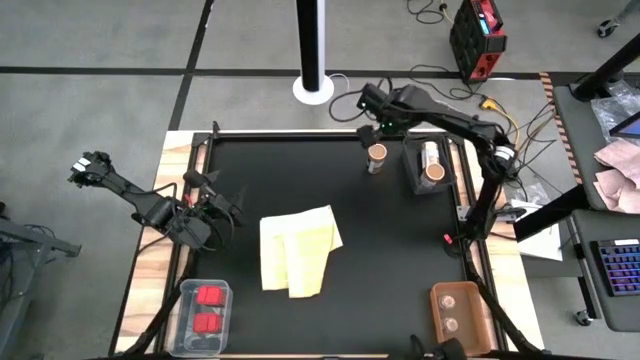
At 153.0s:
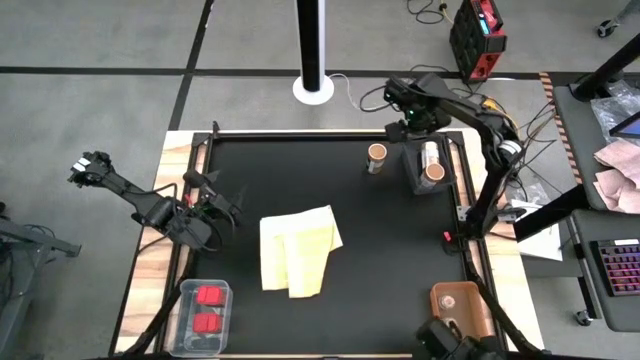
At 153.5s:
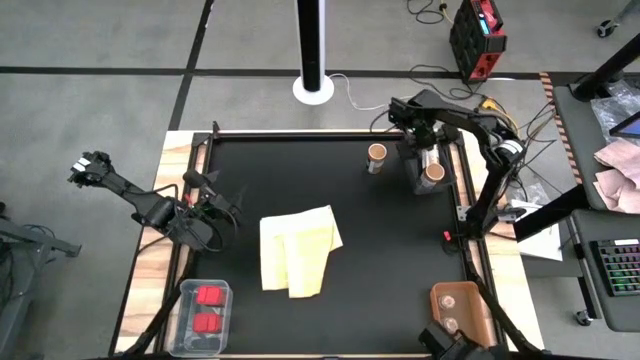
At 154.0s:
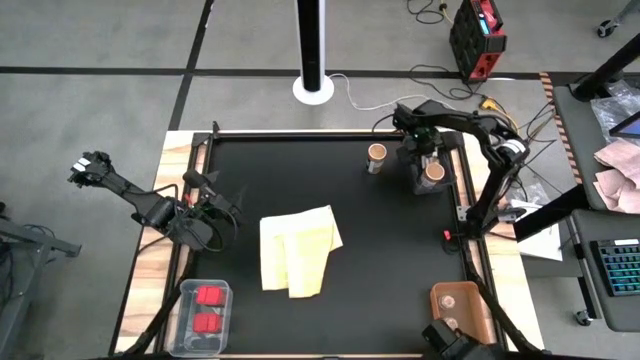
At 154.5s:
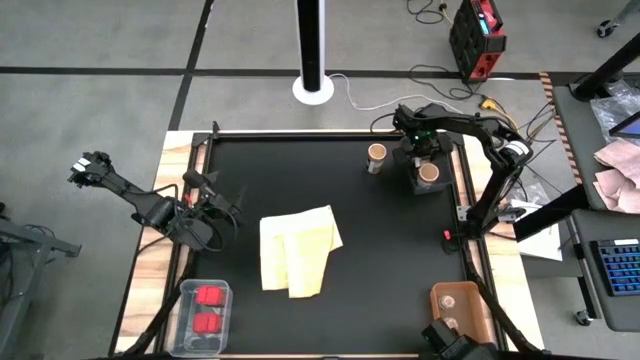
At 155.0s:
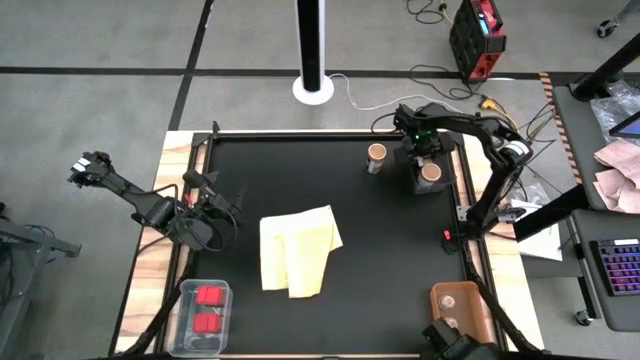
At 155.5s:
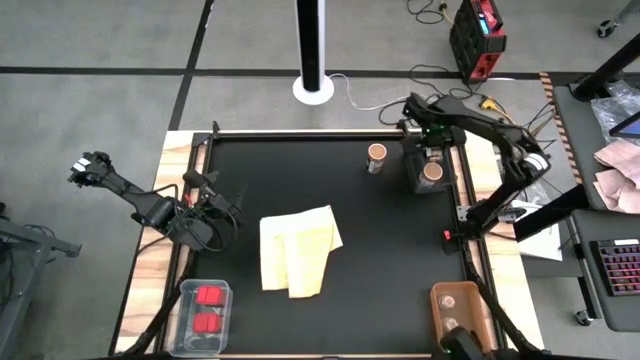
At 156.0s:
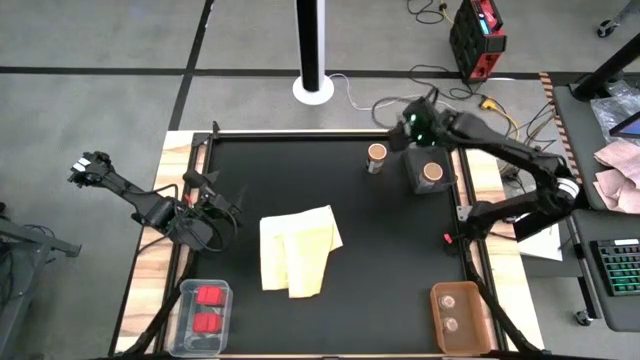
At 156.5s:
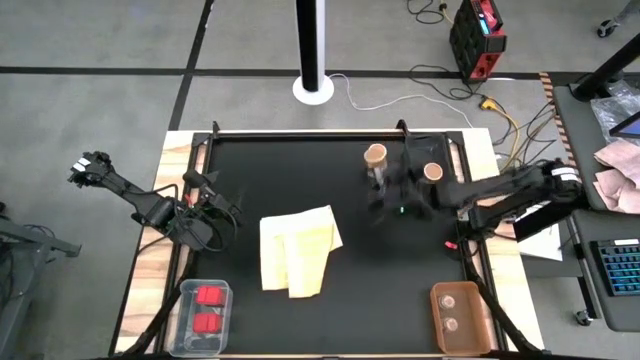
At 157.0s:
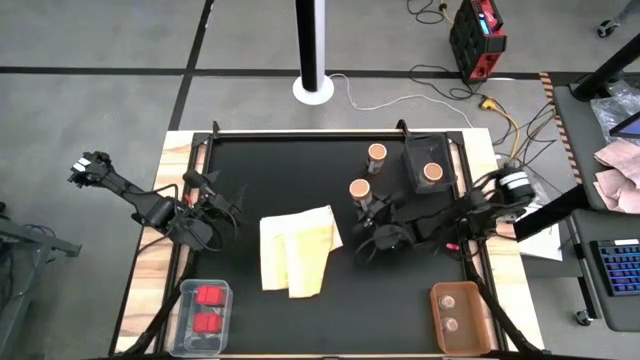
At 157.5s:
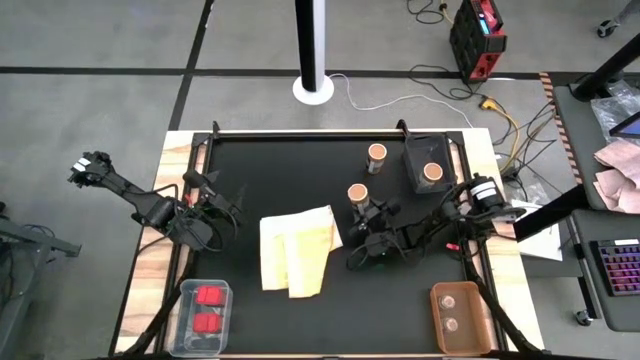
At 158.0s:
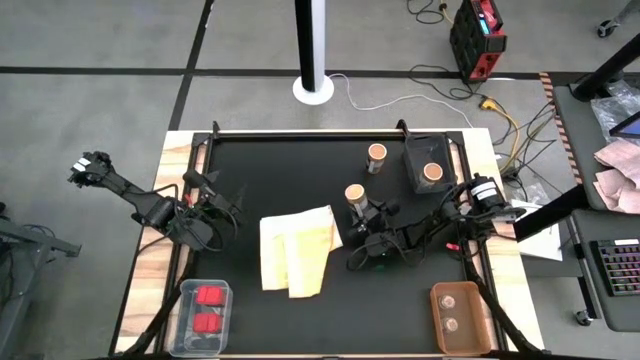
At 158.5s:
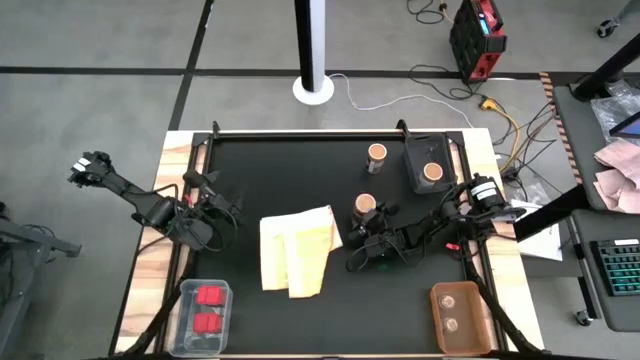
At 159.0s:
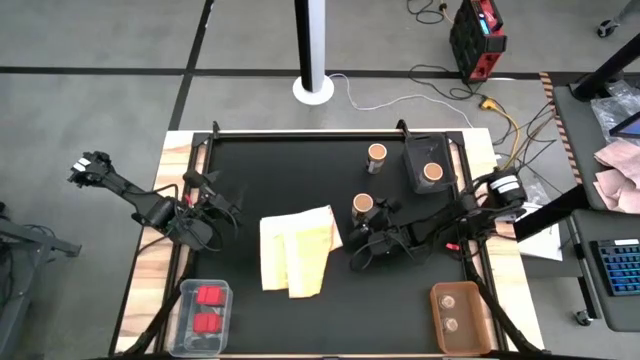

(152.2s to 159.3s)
Task: Sort spices by type
Remove the top golden spice bottle from the black bin

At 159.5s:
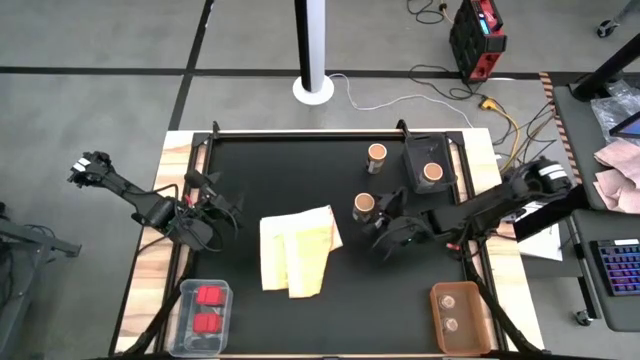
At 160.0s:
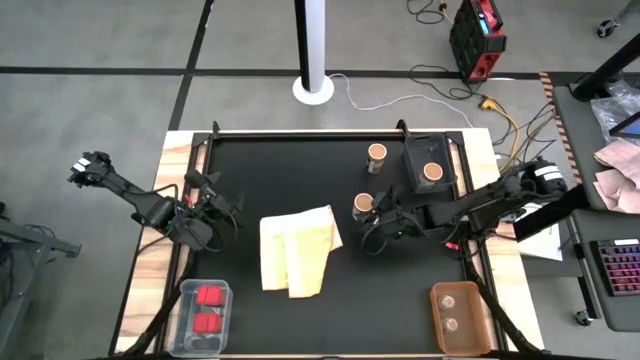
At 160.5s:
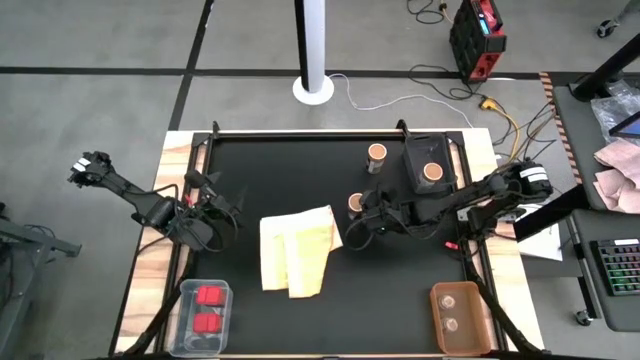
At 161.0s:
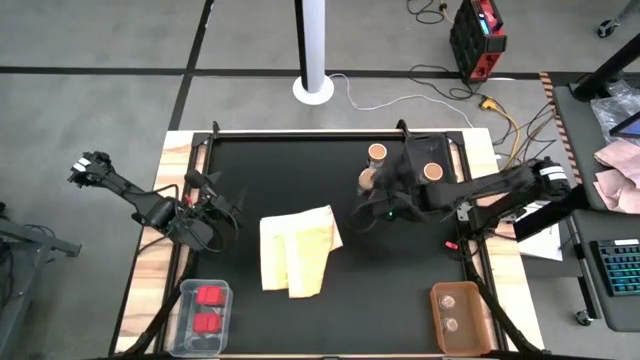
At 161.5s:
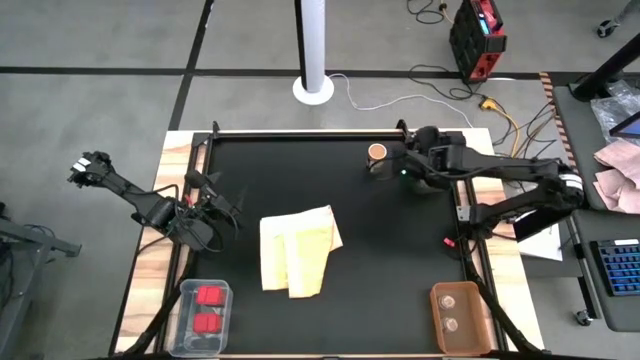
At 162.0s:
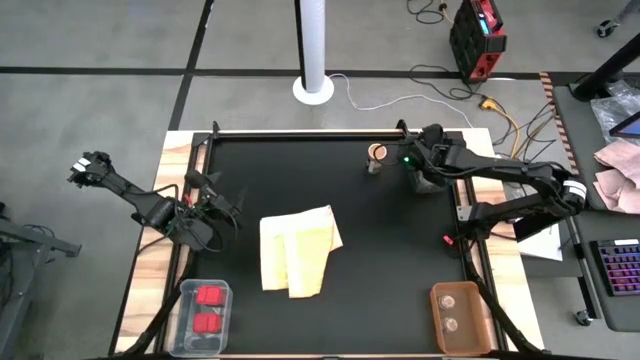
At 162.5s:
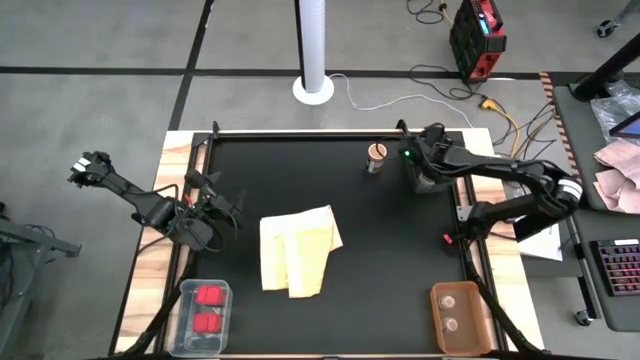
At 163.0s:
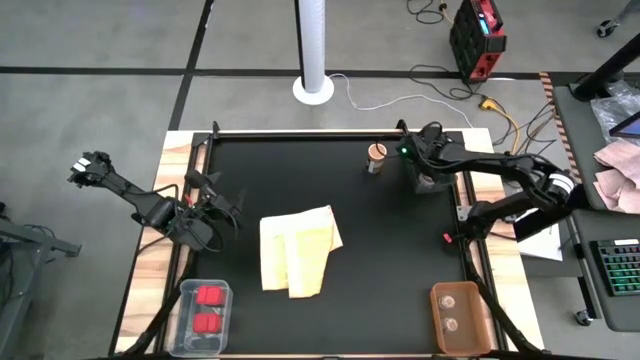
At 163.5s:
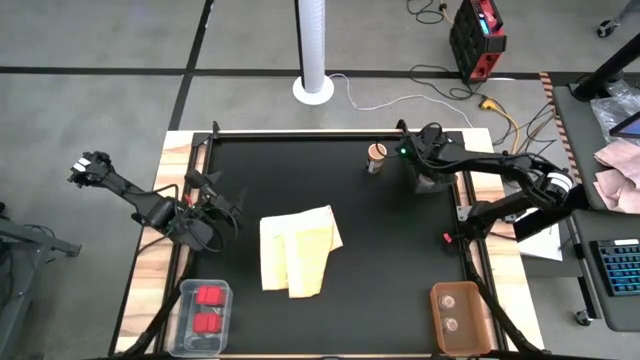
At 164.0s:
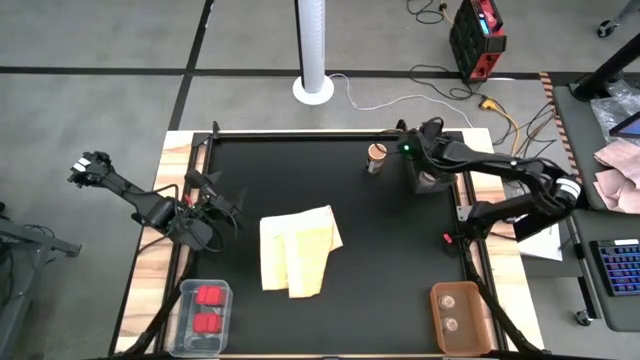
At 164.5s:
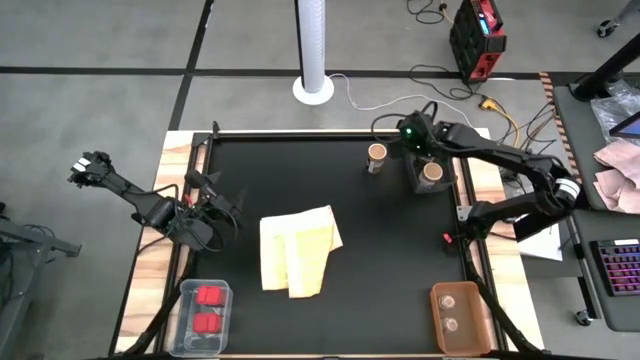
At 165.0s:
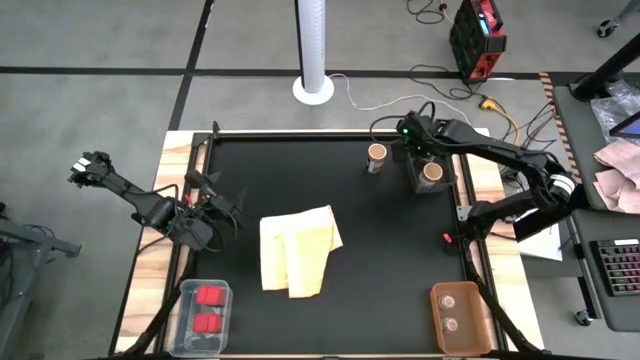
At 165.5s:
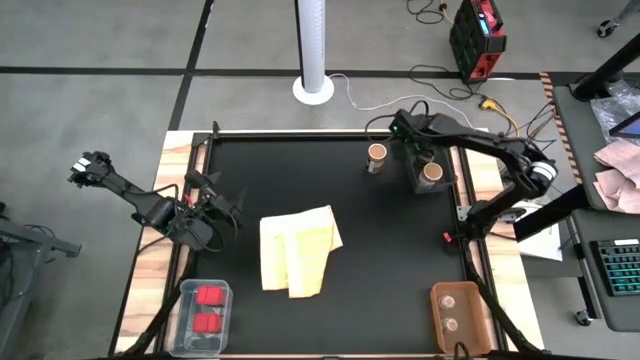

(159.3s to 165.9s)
Put the bottom golden spice bottle into the black bin

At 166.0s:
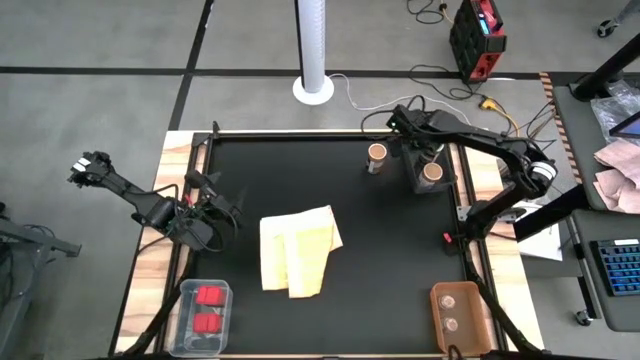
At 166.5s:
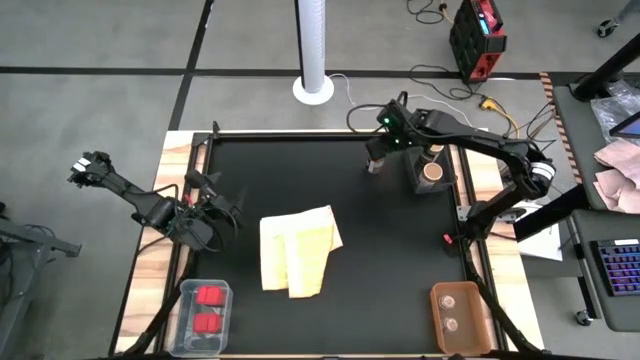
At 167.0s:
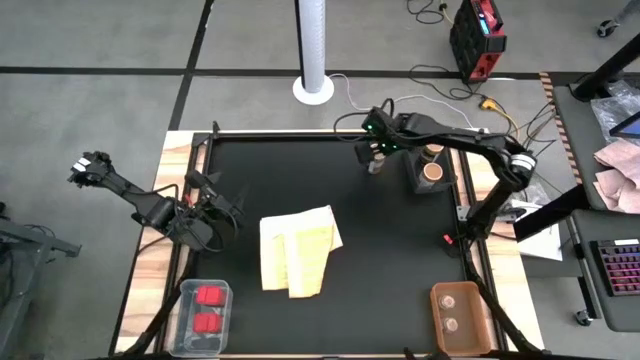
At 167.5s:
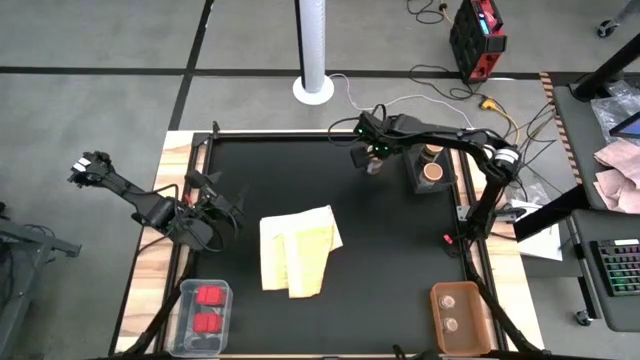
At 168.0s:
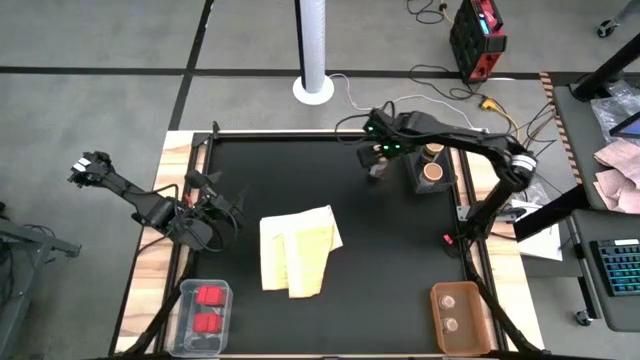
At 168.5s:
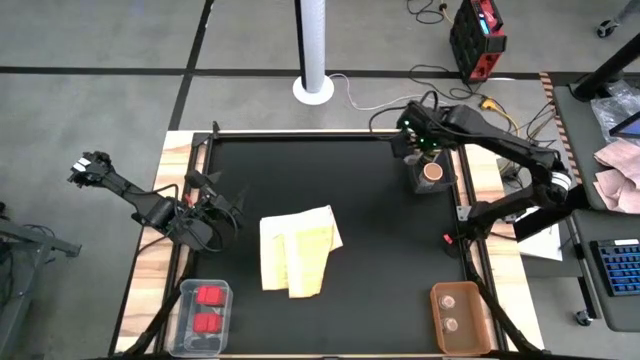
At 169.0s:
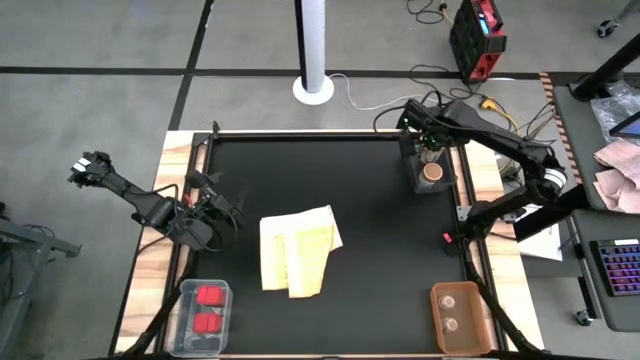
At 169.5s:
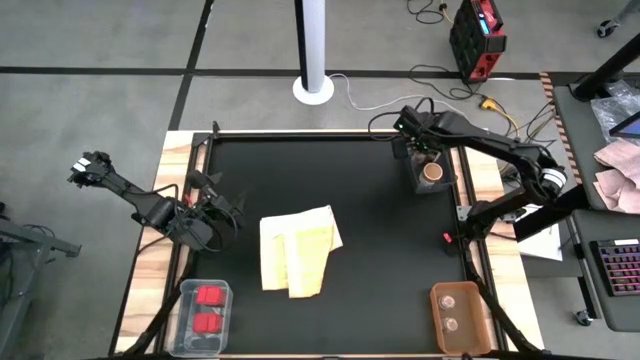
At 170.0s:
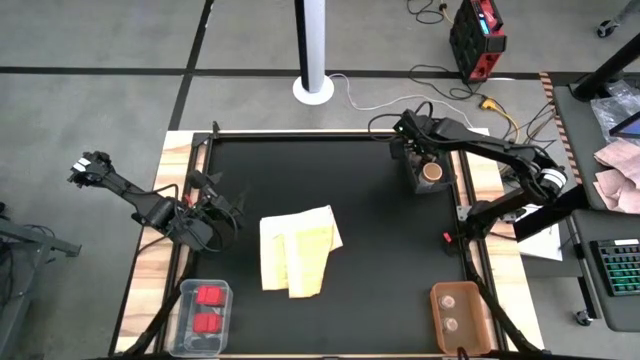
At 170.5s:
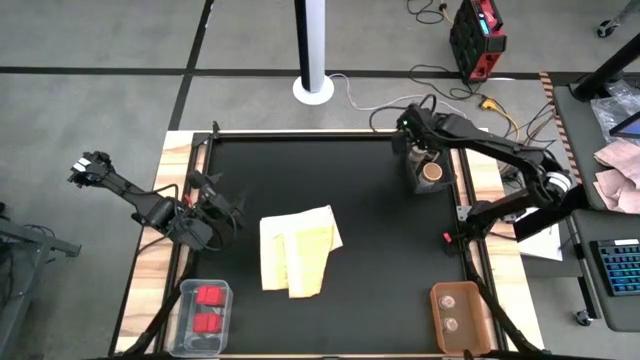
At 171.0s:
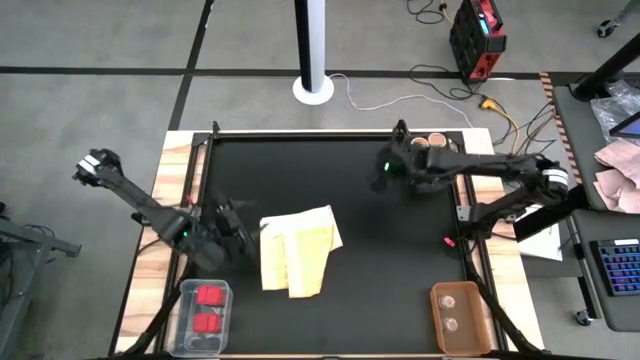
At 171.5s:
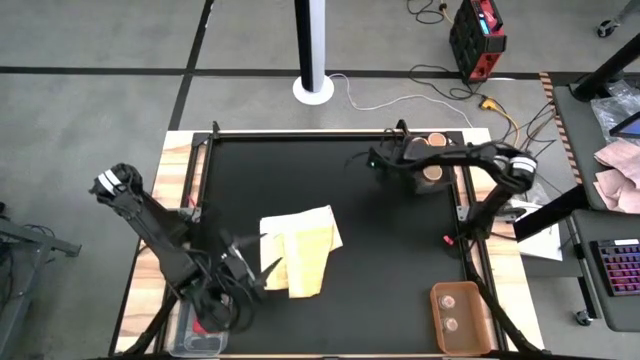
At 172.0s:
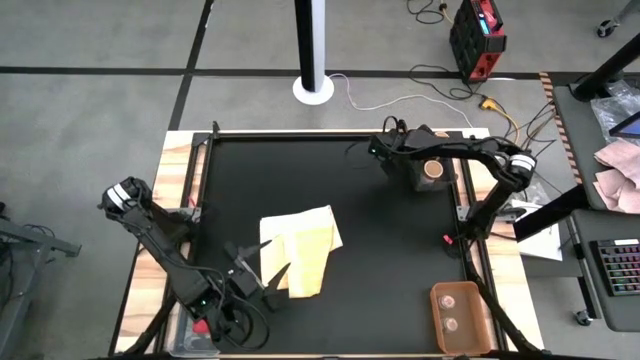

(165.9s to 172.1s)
Put the golden spice bottle into the black bin

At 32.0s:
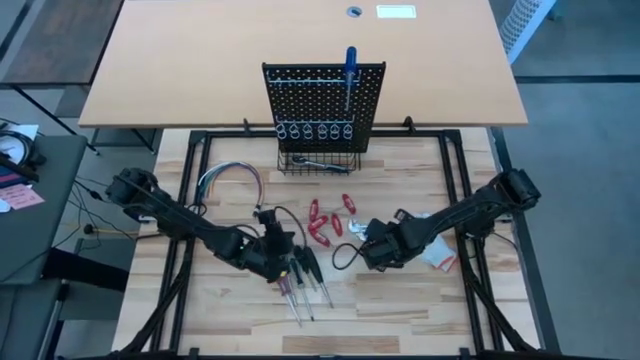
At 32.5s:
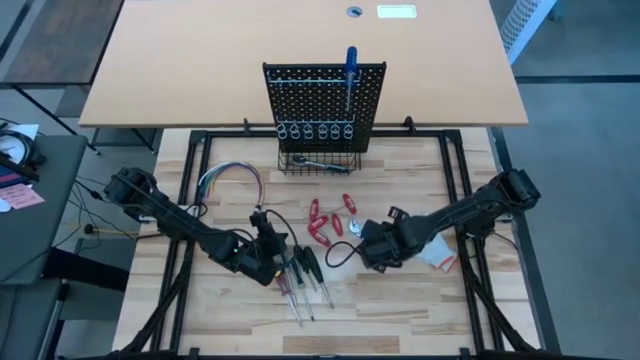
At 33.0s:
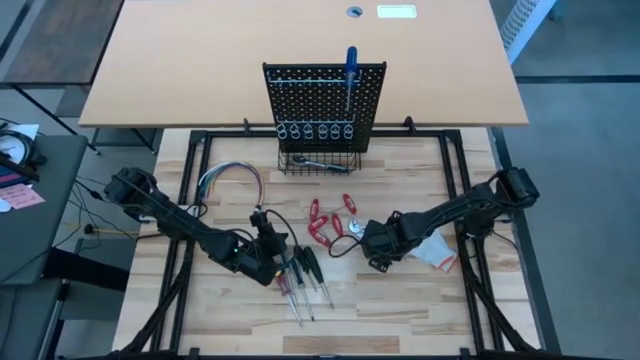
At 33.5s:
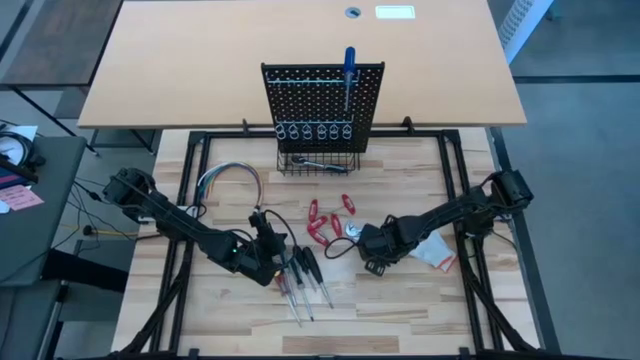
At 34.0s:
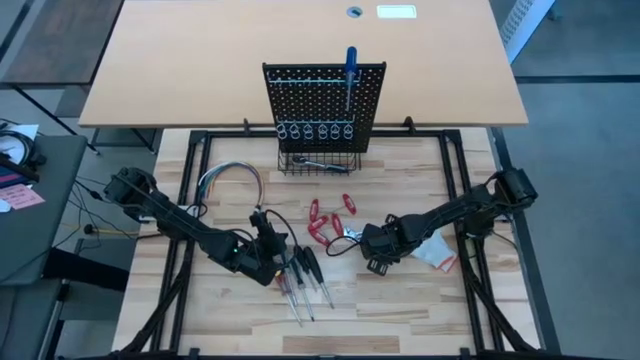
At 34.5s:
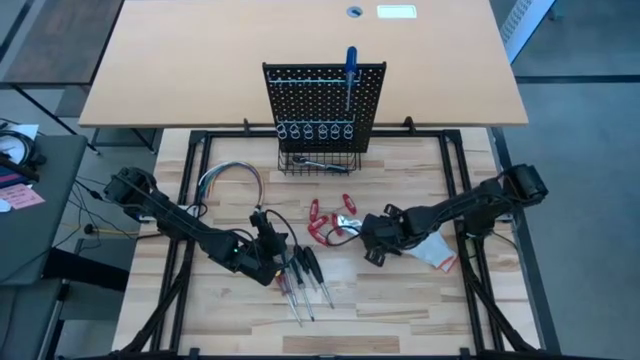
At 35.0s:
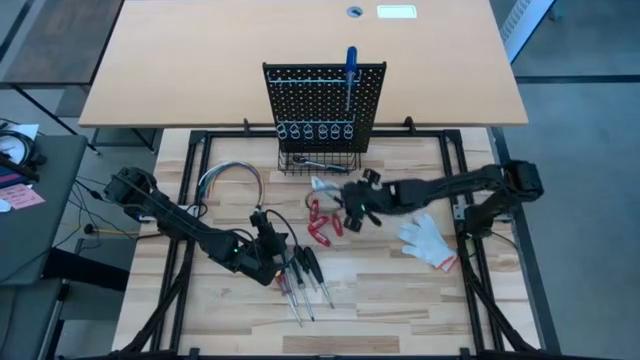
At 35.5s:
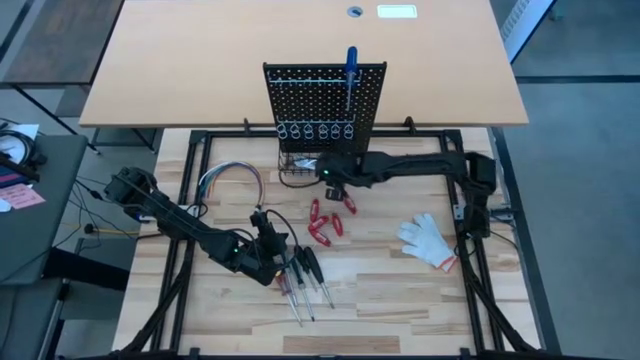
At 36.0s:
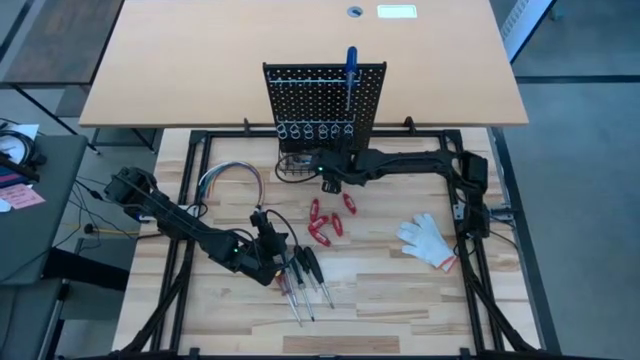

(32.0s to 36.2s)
Task: Hang tools onto peg board
Put the slip-joint pliers into the black wire on the pegboard
